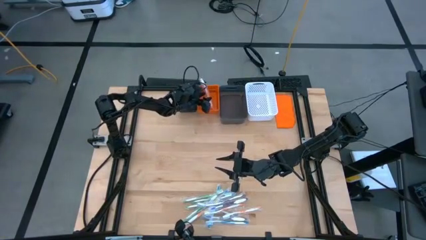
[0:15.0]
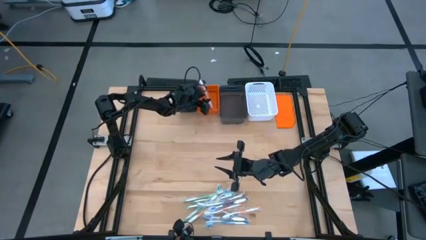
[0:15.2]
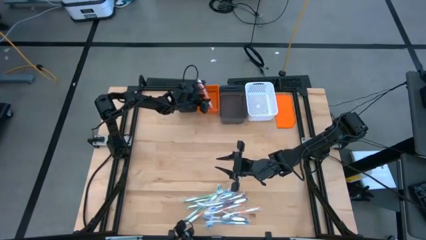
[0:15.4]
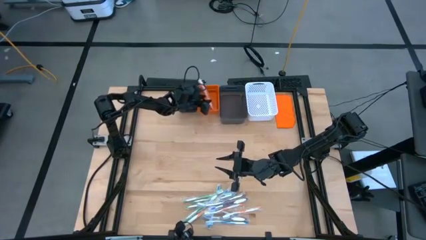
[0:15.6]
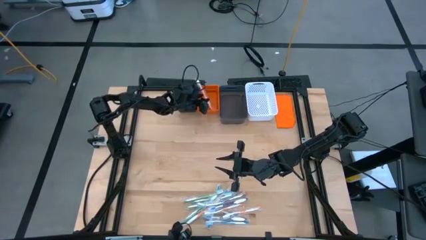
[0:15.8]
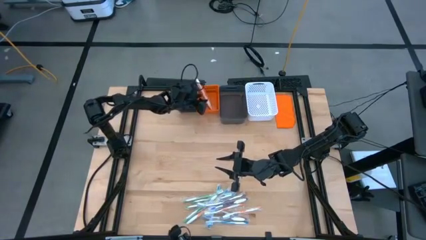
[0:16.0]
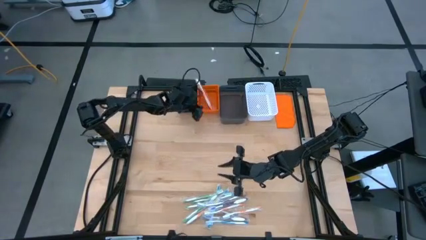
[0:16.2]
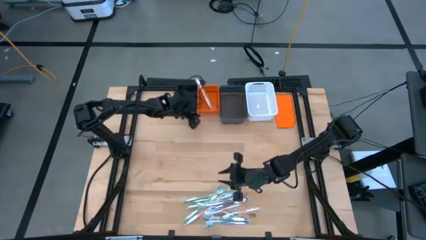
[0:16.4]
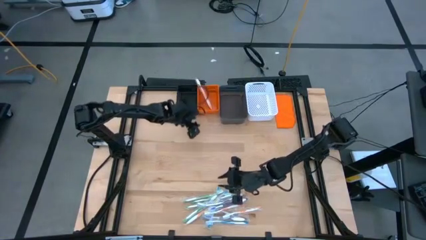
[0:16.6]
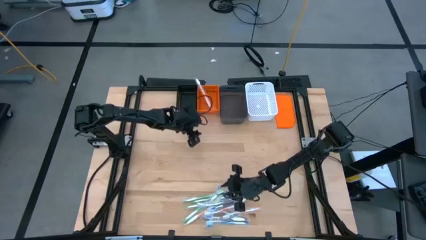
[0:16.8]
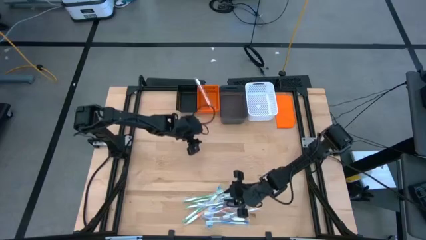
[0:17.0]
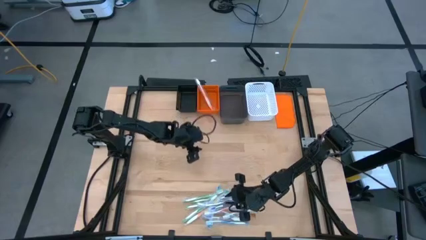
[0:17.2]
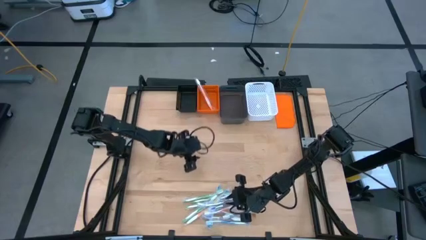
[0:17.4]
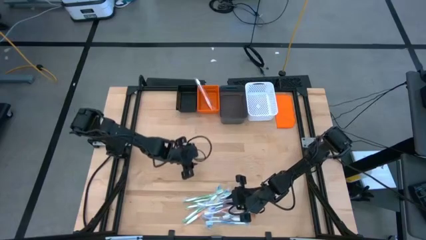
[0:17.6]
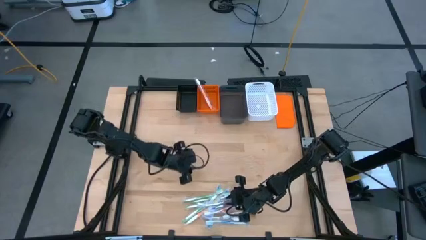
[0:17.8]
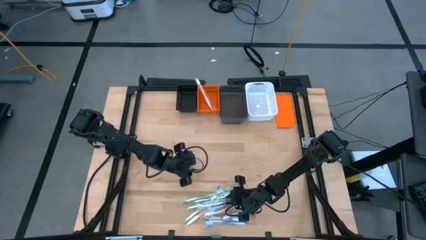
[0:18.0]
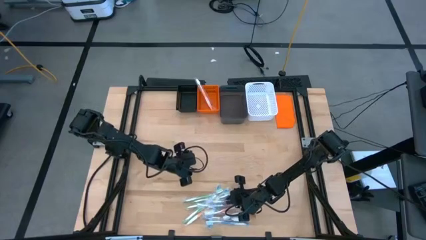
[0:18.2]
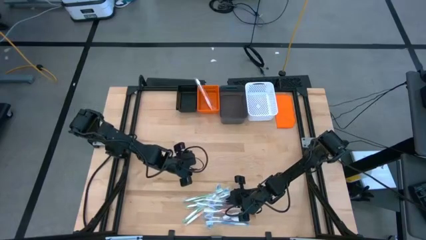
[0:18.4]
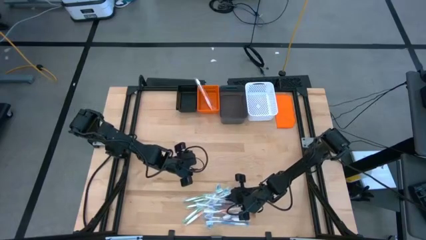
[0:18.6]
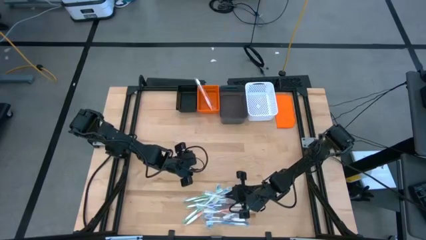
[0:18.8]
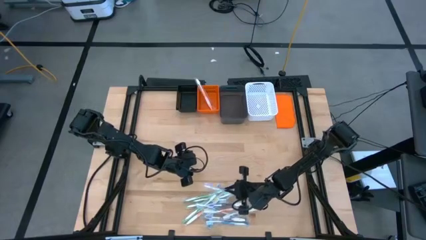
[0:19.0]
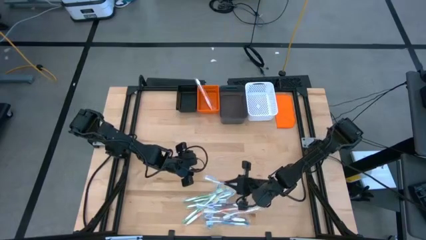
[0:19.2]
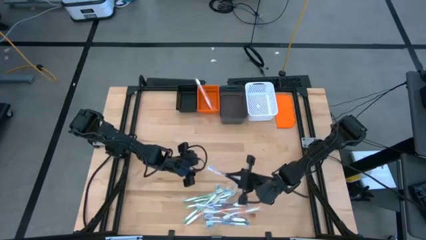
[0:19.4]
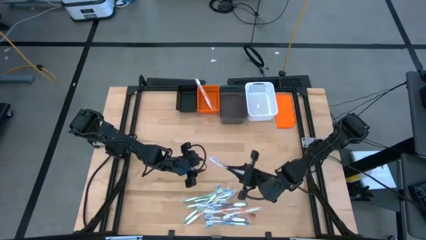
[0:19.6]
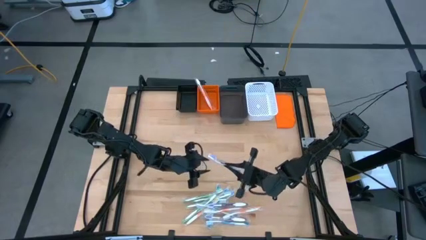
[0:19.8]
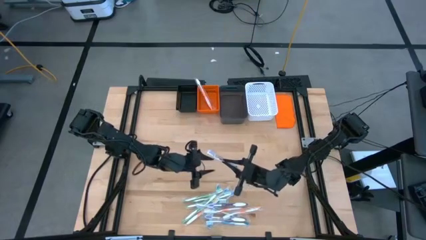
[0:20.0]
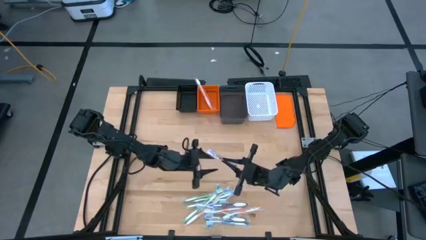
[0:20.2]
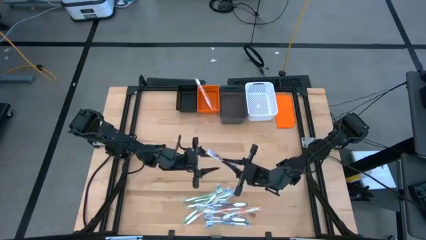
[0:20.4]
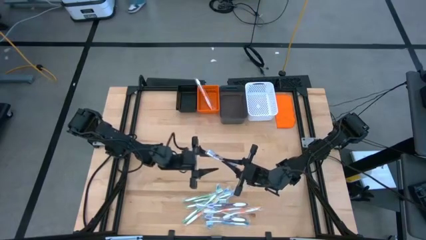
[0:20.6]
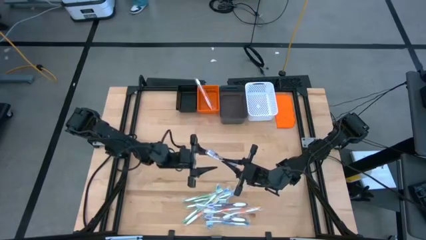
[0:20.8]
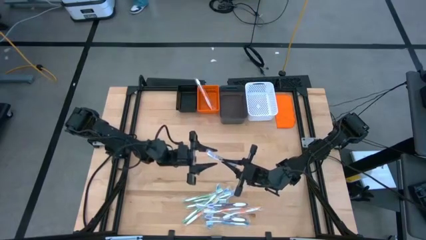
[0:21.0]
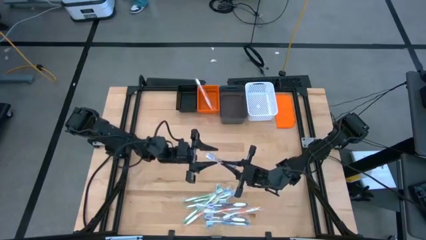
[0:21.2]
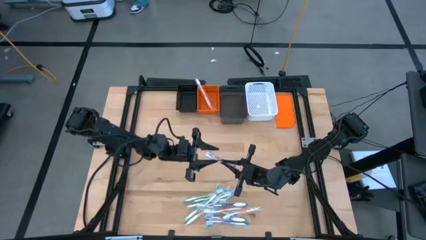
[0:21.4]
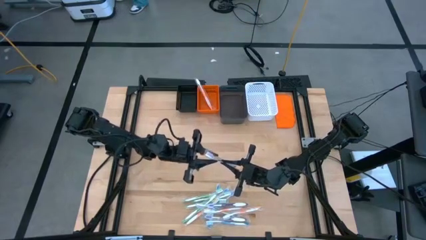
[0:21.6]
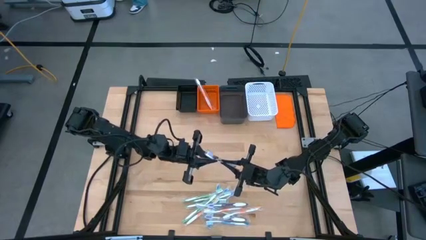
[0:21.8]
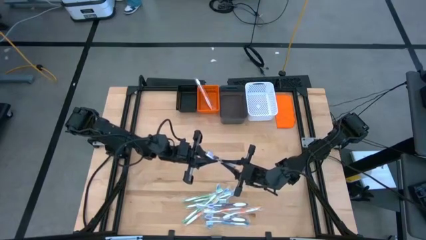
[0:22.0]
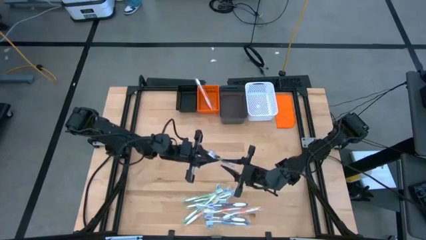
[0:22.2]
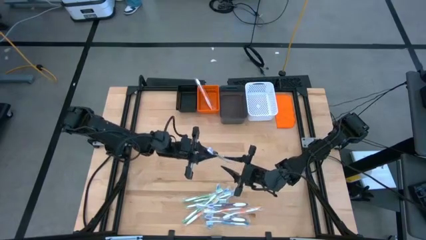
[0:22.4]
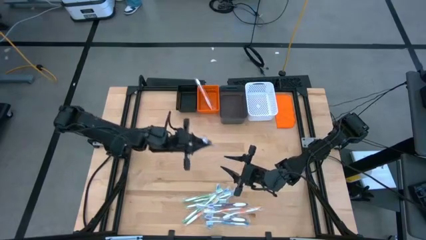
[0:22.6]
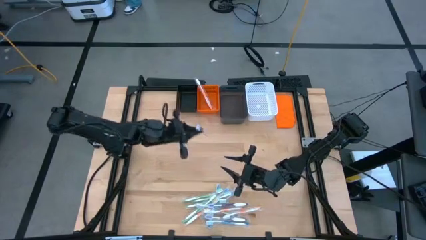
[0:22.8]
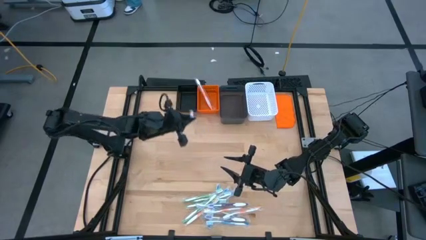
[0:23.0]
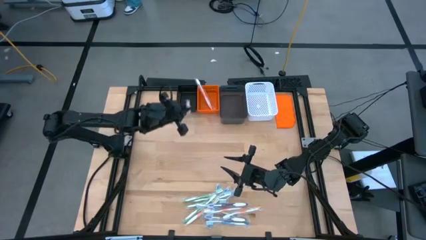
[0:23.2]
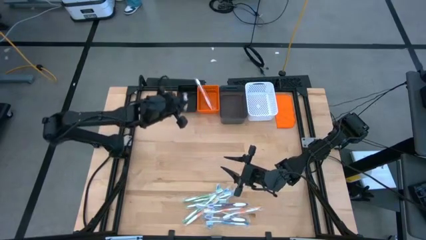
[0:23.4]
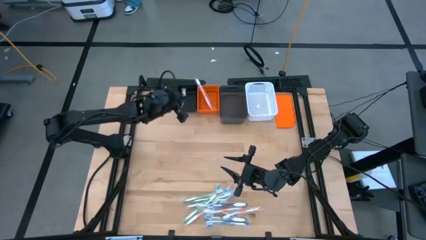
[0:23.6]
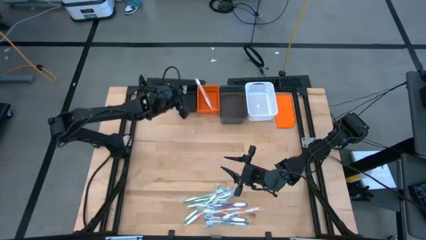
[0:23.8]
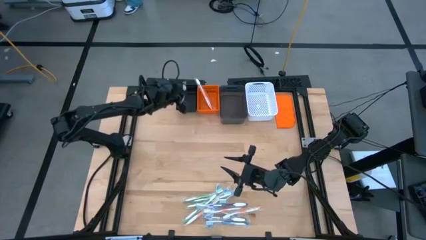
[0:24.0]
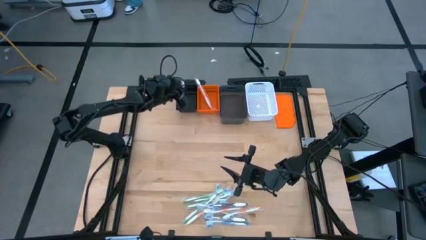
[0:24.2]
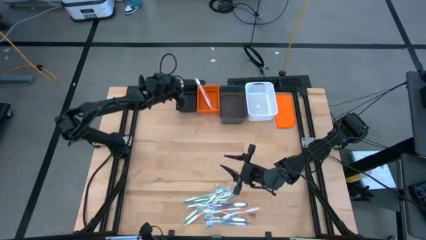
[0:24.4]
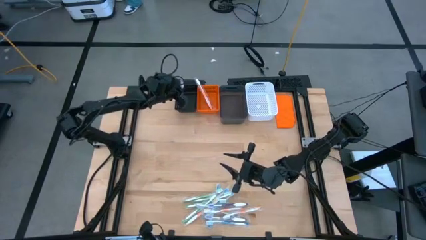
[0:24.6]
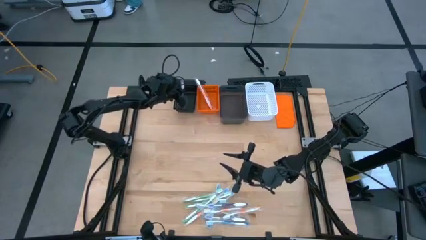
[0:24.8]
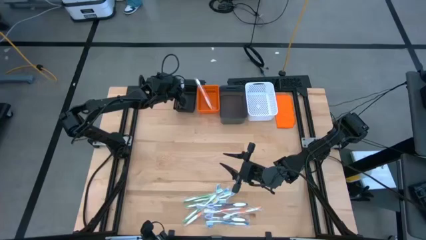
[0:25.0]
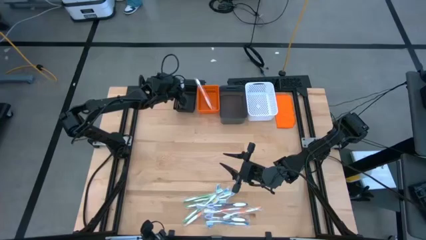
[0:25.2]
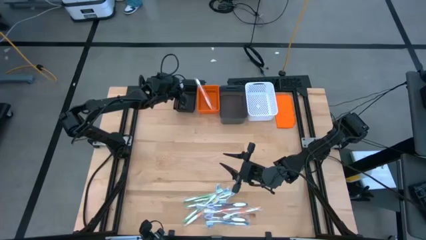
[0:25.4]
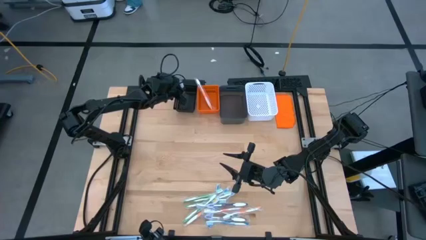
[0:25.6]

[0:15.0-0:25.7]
Task: Pick & Place Toothbrushes
Put the purple toothbrush into the black basket

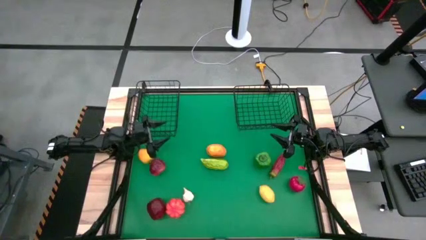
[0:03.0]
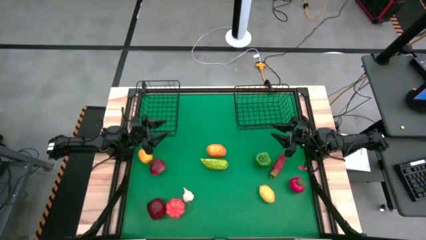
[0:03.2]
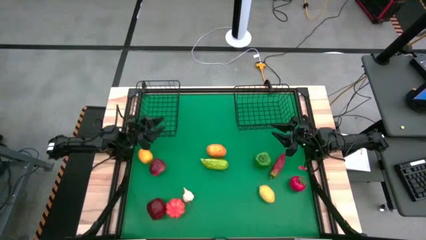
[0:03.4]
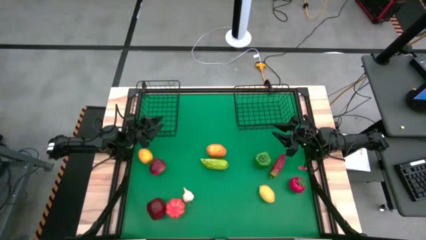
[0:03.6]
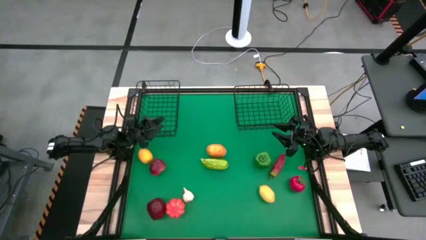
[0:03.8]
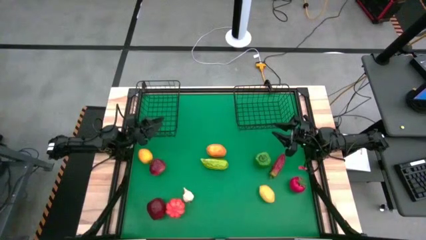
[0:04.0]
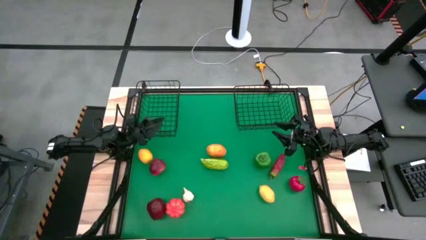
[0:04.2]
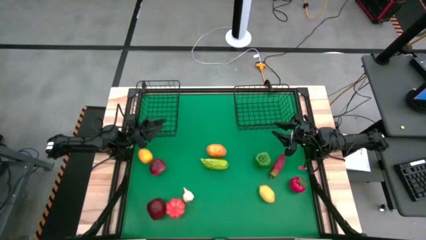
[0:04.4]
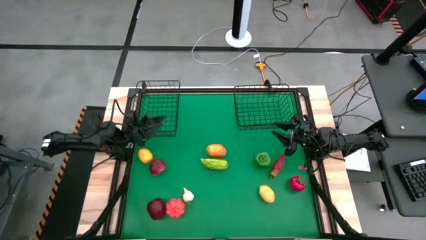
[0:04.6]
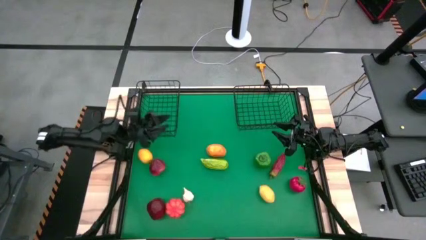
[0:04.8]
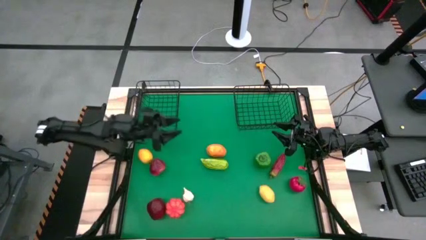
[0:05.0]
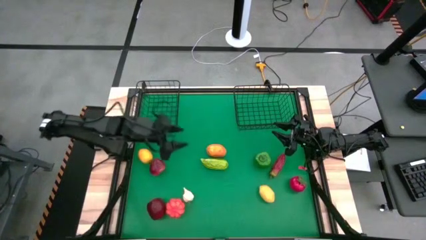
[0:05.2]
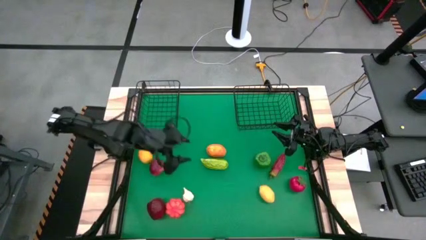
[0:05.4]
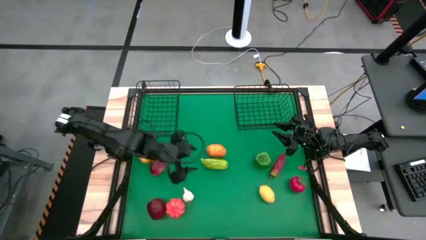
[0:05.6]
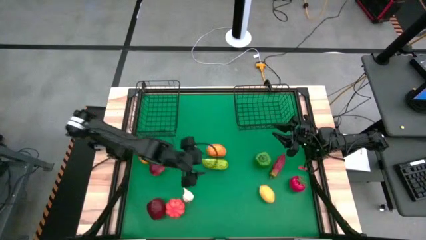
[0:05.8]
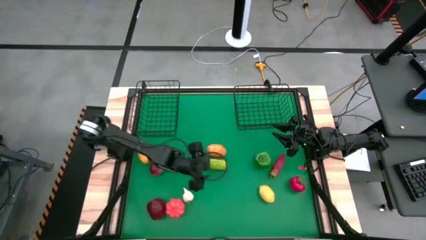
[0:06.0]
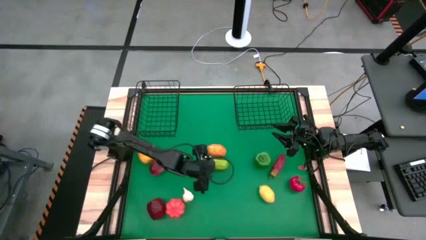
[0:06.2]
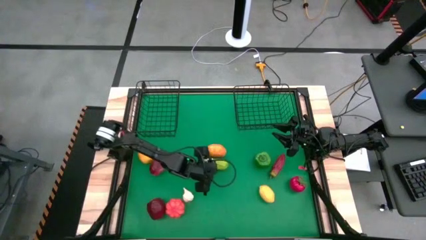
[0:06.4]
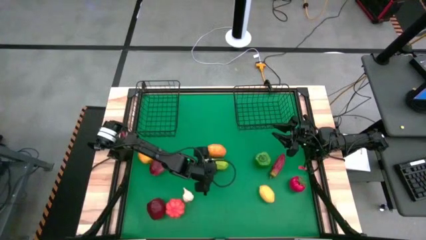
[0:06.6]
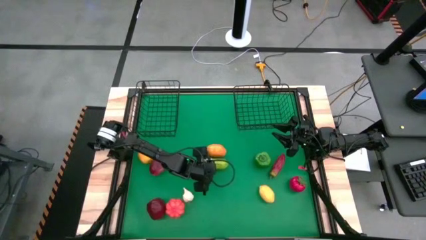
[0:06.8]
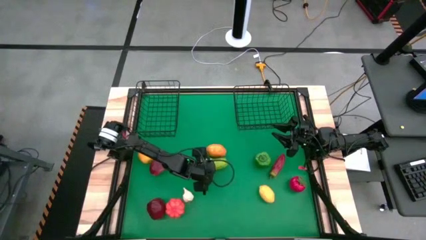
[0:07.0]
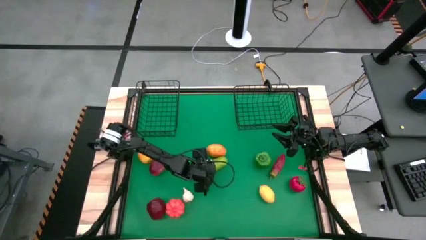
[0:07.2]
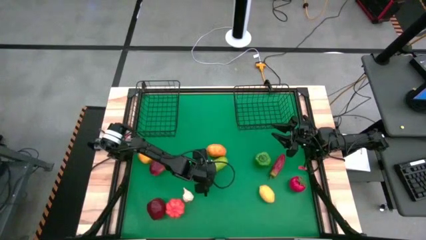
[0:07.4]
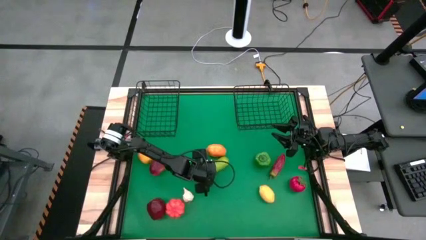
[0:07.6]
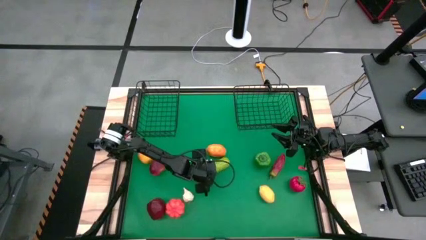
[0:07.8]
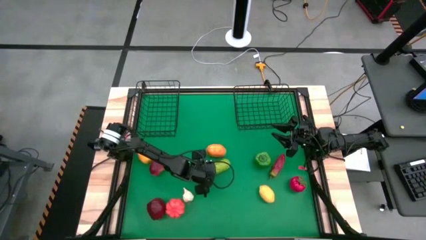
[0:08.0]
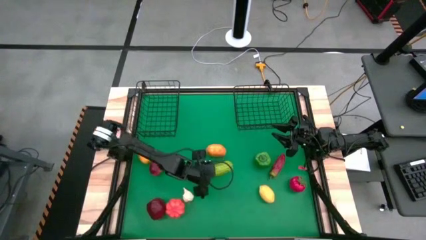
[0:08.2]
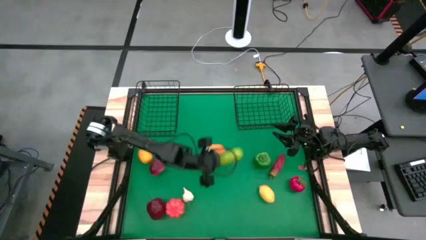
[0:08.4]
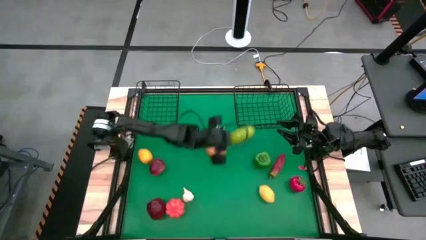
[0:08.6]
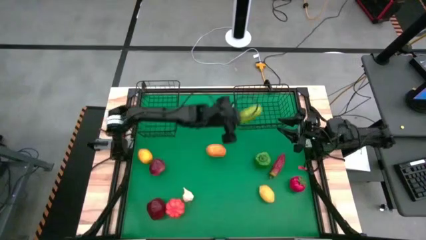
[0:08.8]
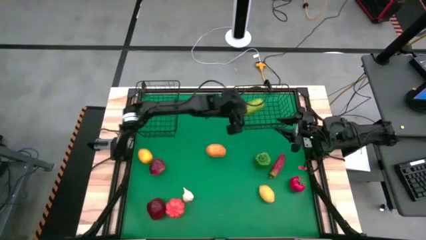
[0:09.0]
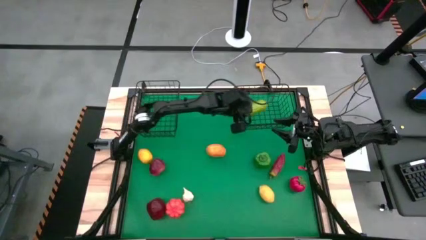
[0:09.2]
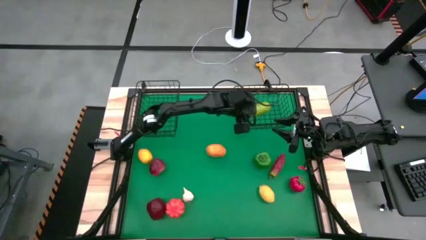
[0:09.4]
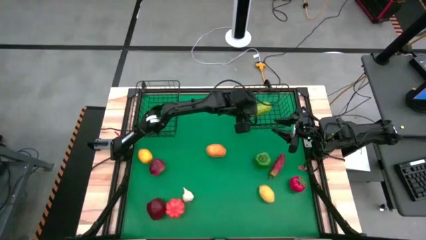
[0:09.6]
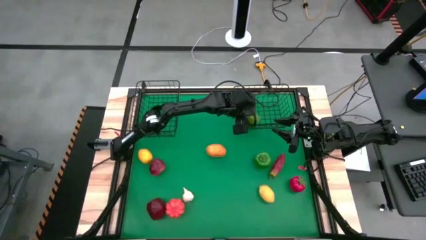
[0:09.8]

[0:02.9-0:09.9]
Task: Sort produce into baskets
Put the green cucumber into the right wire basket
